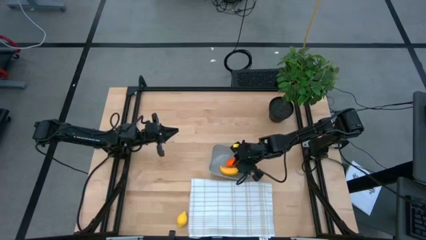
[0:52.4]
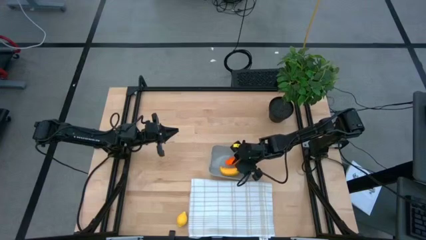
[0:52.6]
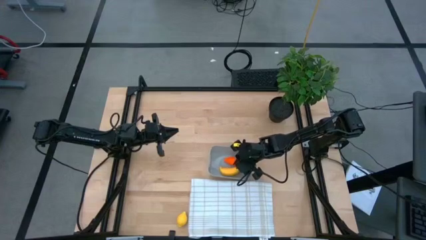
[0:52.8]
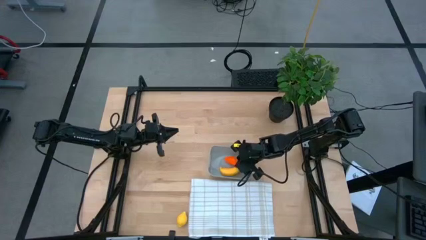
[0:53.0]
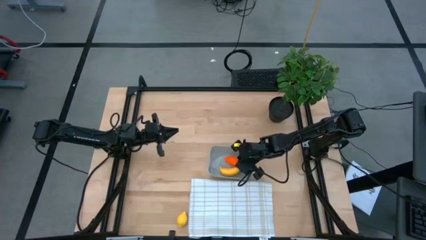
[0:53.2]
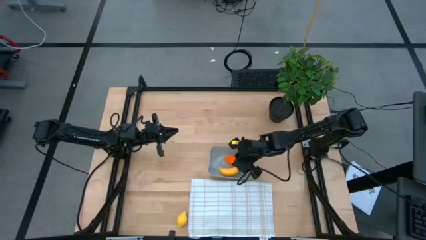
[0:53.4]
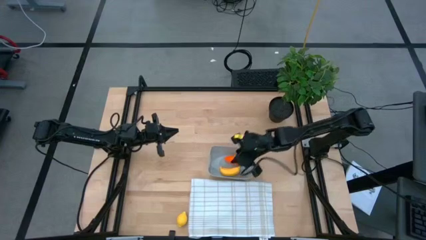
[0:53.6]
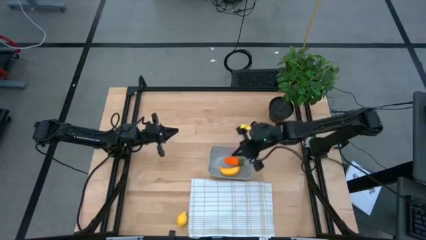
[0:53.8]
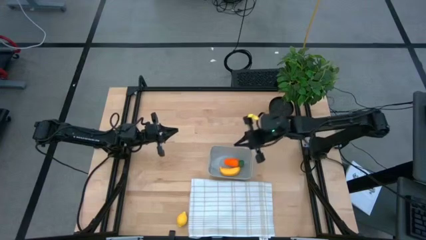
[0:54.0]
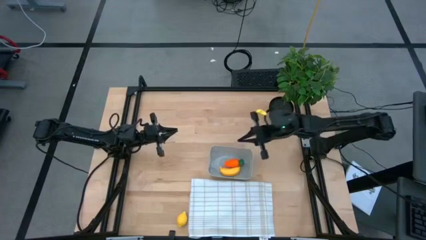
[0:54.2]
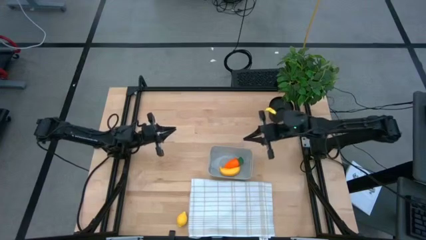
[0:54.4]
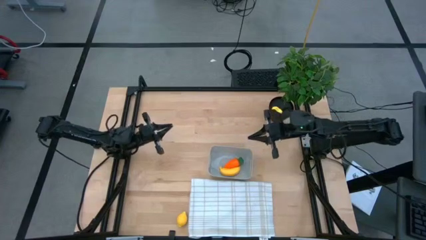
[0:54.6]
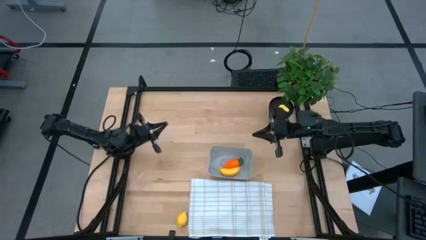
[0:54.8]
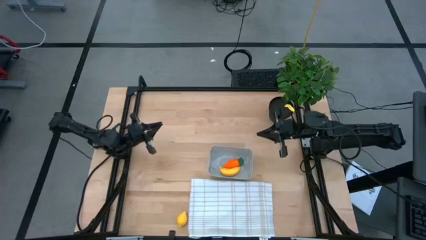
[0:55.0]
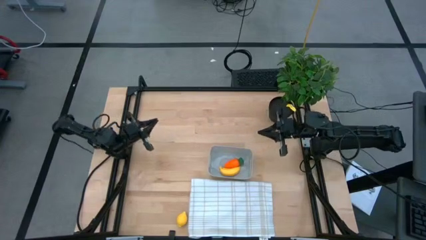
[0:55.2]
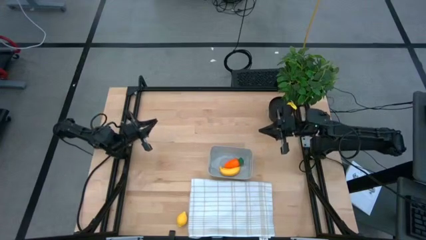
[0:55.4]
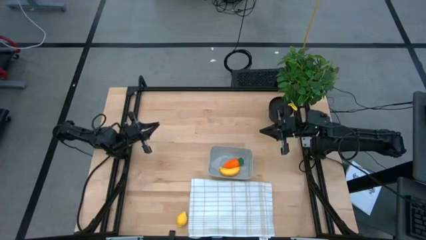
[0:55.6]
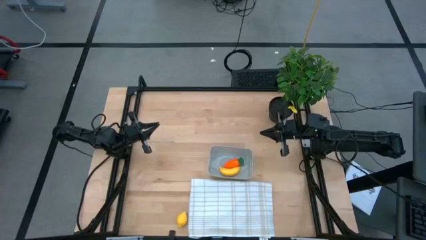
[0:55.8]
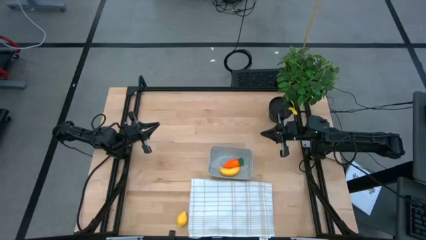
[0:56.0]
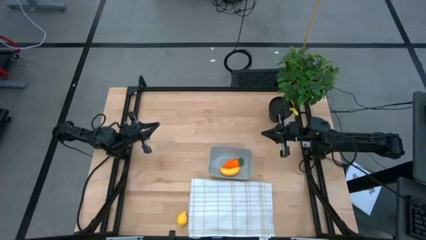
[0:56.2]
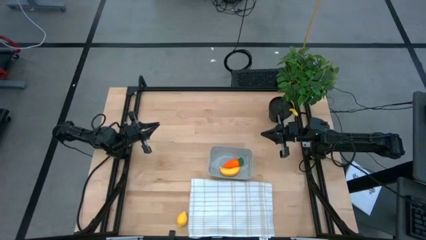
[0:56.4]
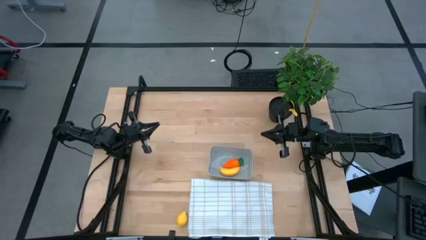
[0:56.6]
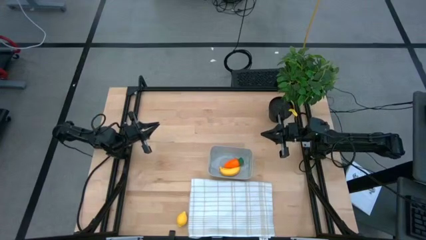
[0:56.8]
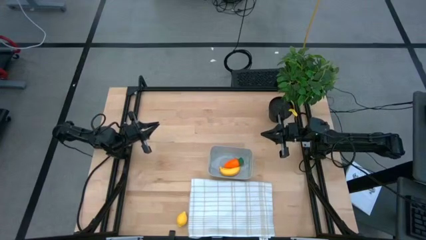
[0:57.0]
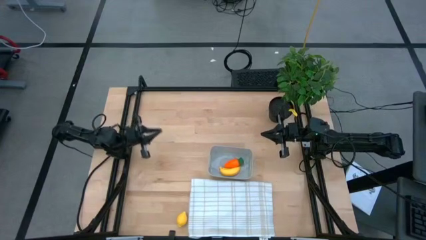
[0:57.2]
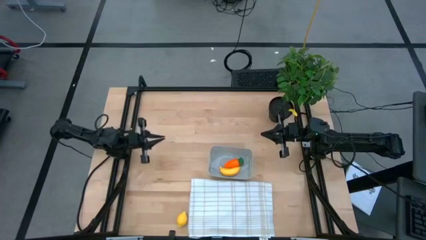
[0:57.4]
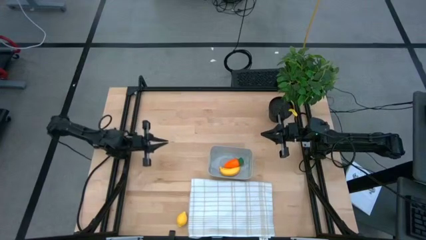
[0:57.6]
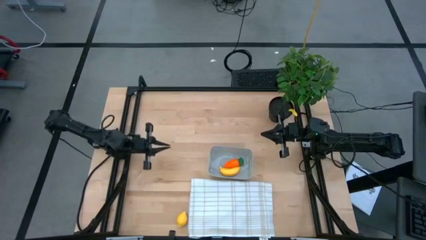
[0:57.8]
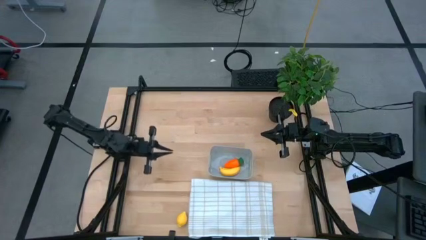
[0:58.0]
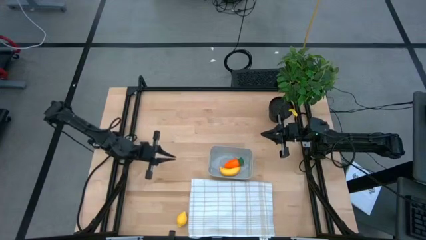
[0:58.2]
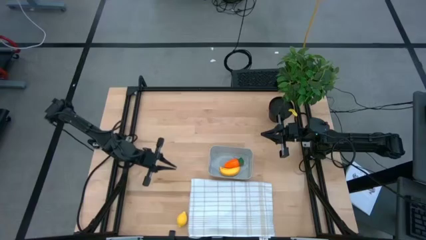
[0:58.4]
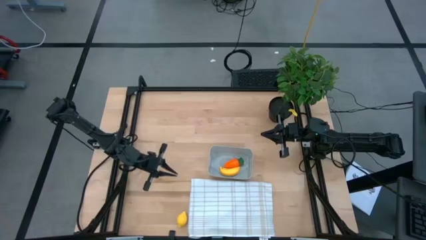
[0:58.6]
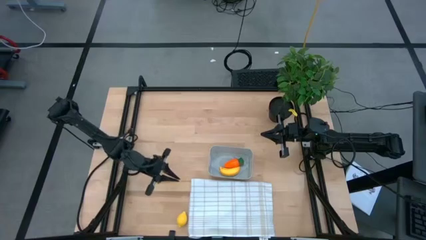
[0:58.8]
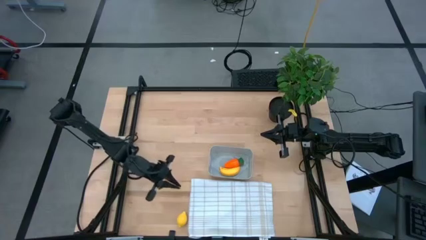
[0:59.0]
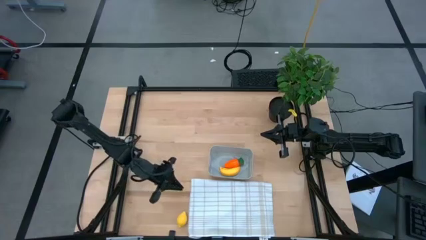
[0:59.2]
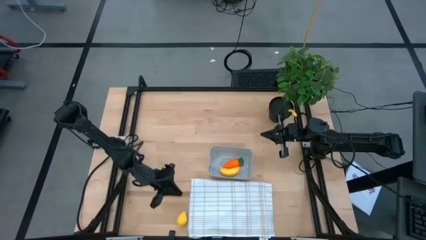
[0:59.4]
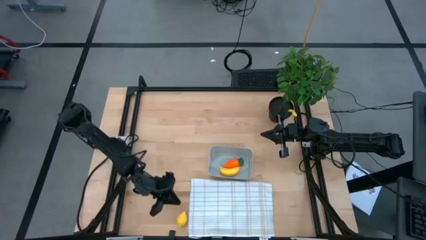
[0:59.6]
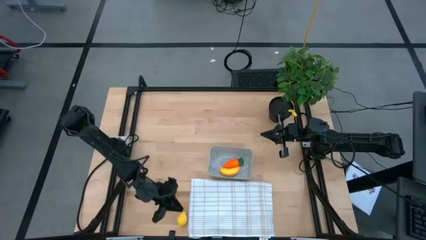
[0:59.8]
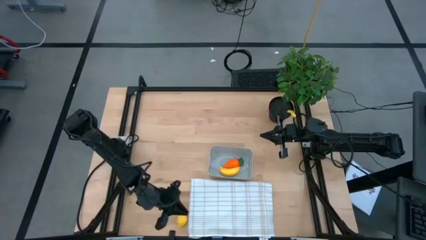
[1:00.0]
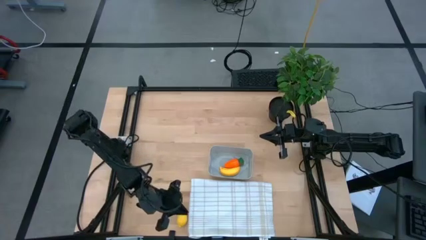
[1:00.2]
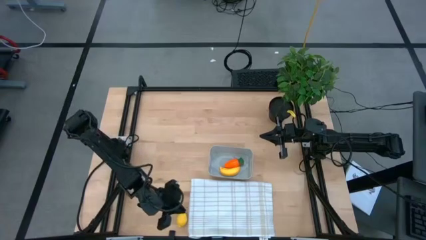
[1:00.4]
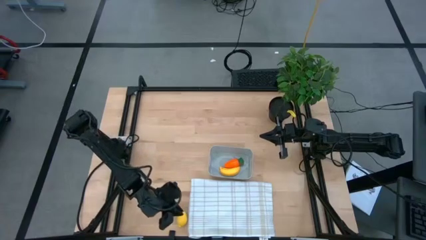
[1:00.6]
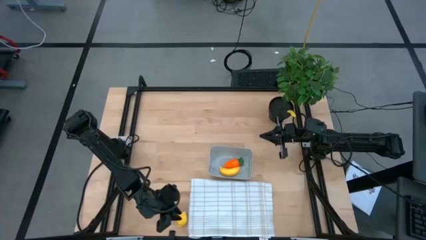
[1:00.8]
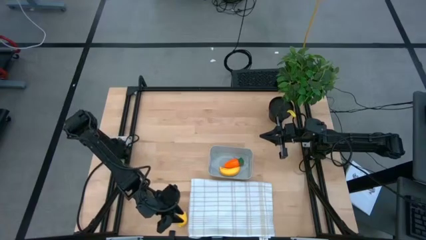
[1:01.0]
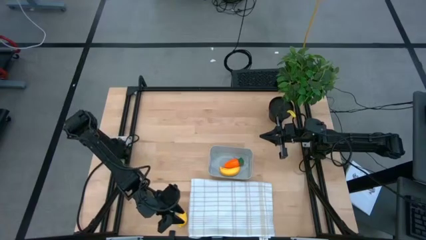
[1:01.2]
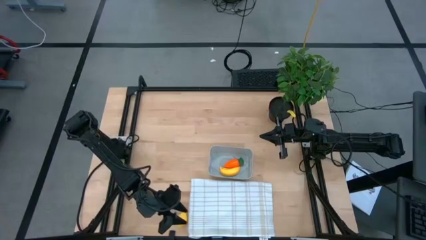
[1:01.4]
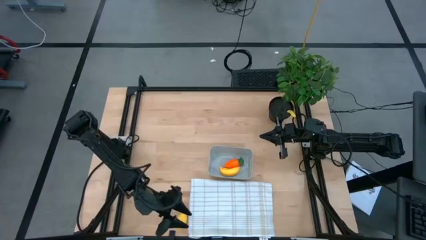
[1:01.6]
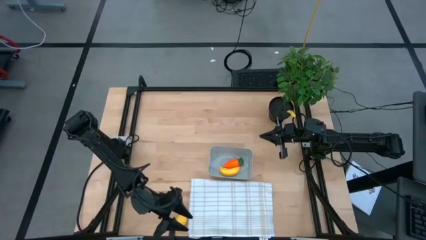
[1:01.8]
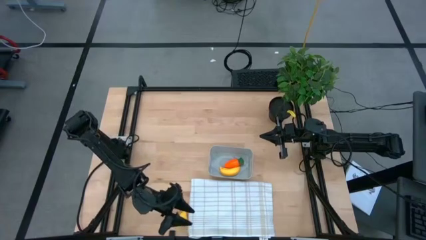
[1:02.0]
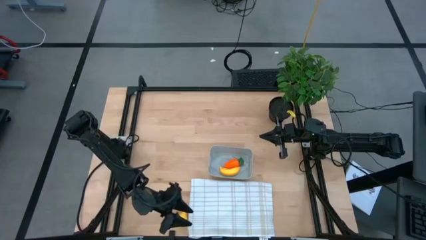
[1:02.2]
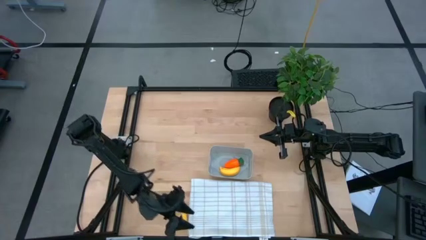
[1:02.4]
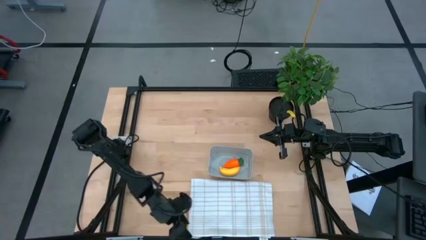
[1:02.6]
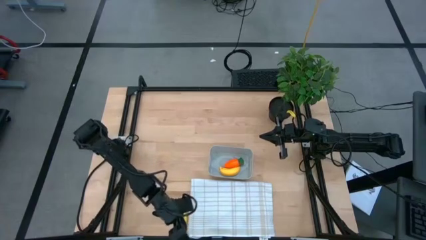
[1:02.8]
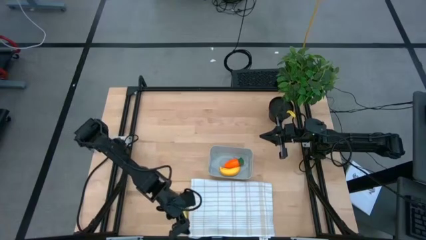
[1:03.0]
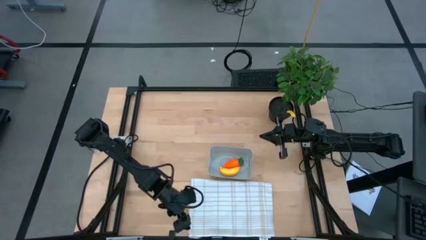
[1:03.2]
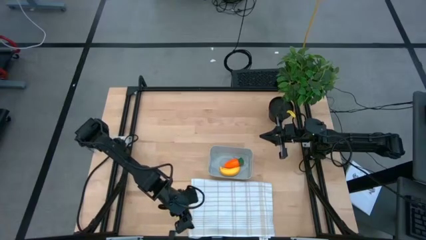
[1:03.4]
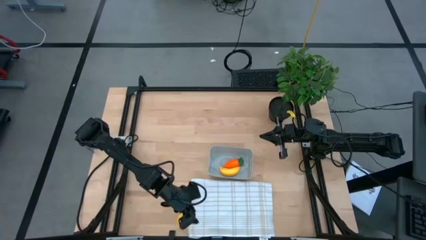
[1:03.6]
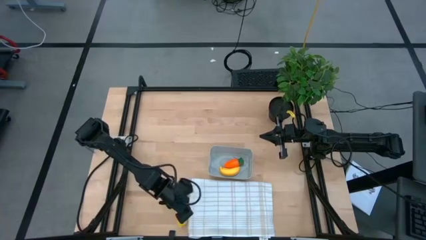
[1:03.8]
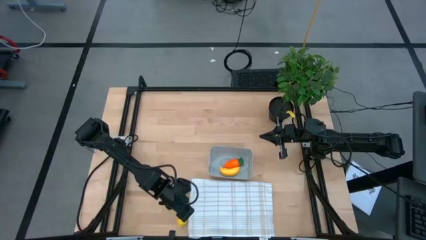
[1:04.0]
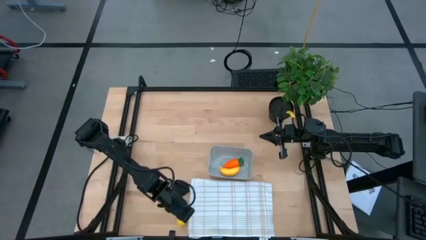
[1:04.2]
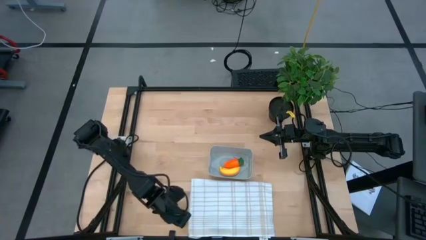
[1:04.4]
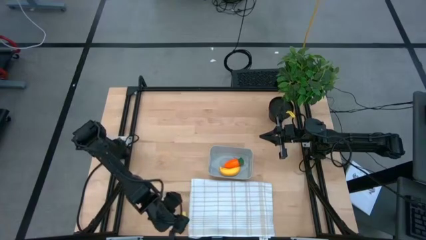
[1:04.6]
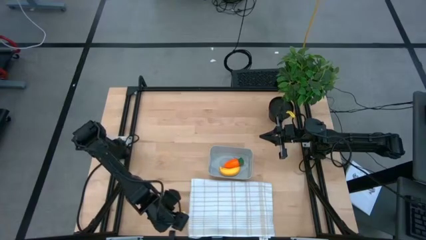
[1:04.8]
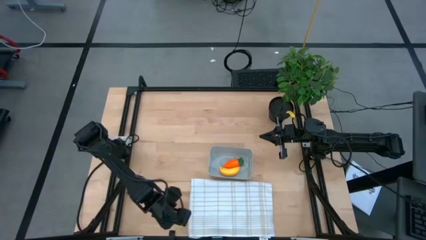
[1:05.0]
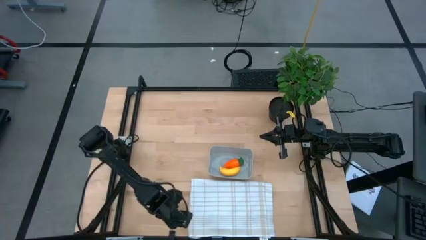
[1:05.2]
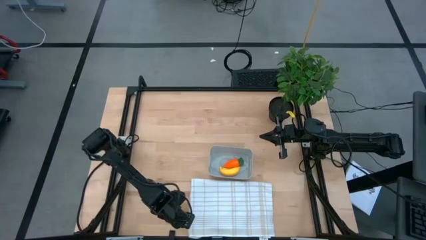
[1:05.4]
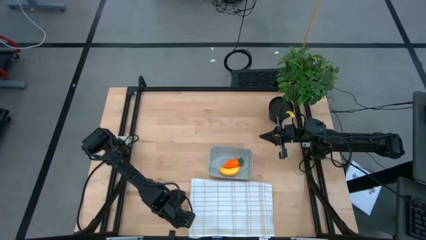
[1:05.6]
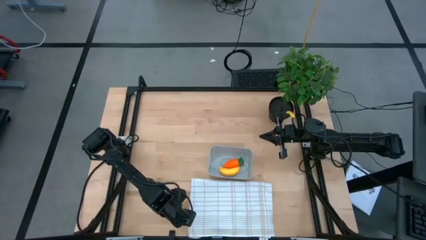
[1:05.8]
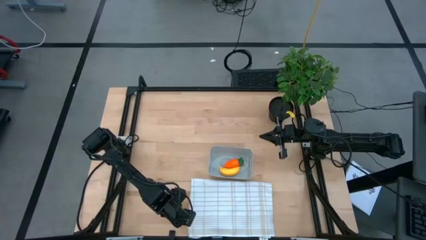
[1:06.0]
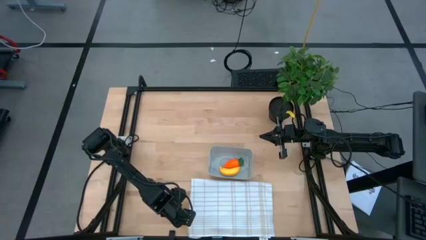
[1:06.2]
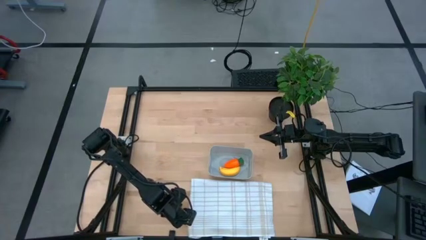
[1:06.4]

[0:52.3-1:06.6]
Task: Pick and placing Produce into tupperware
Put the yellow lemon into the gray bin
